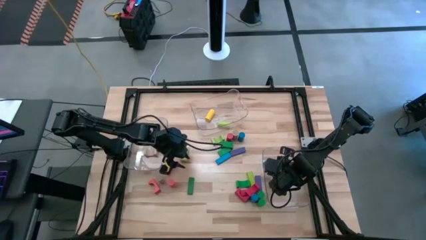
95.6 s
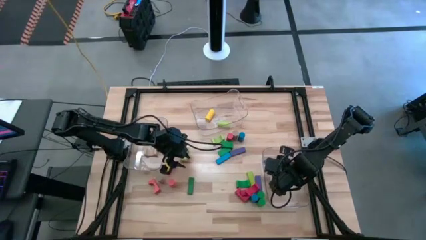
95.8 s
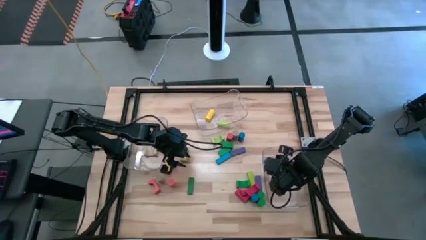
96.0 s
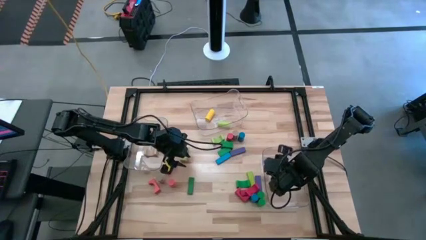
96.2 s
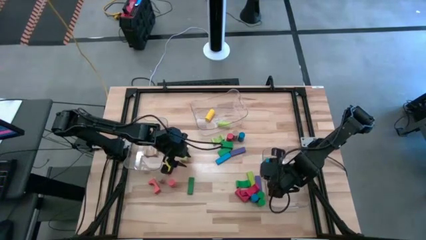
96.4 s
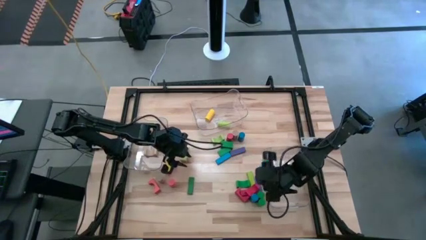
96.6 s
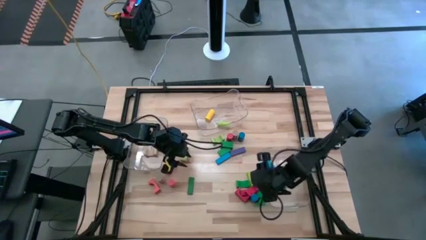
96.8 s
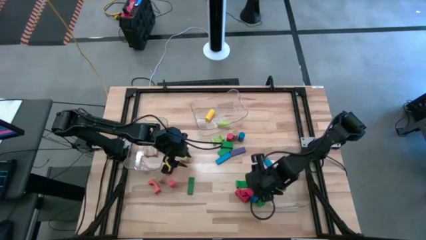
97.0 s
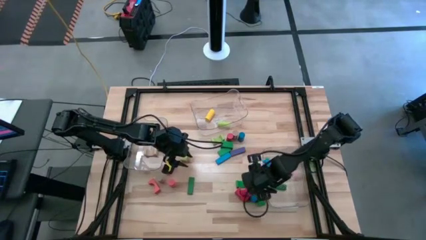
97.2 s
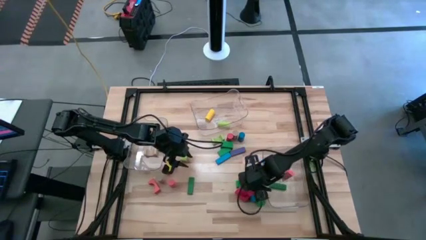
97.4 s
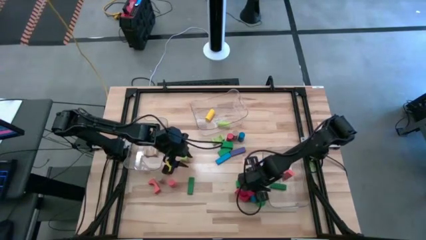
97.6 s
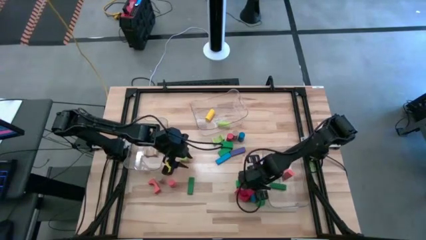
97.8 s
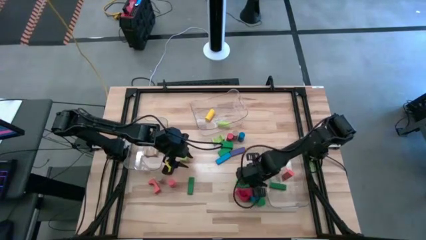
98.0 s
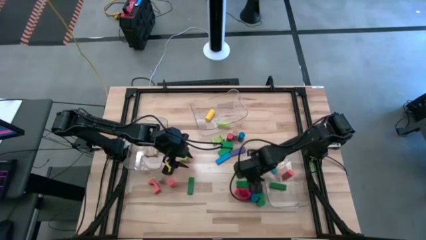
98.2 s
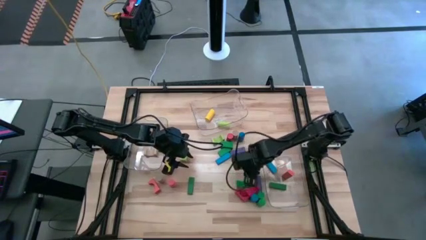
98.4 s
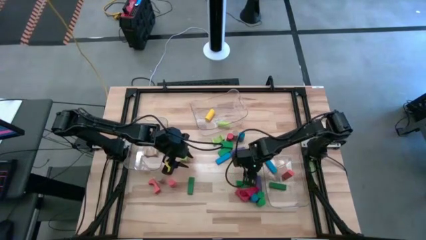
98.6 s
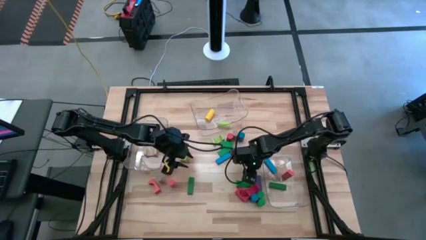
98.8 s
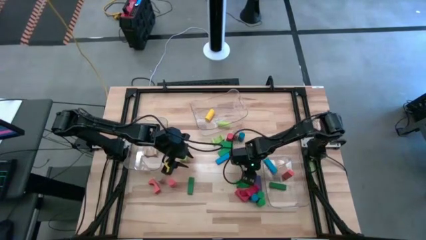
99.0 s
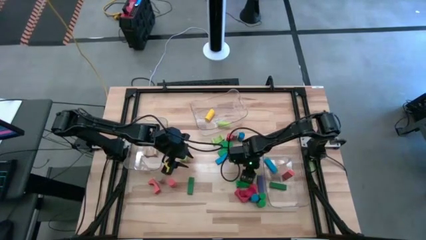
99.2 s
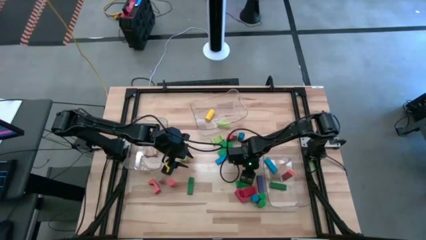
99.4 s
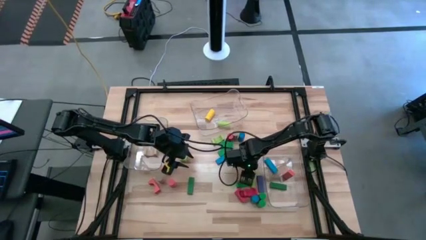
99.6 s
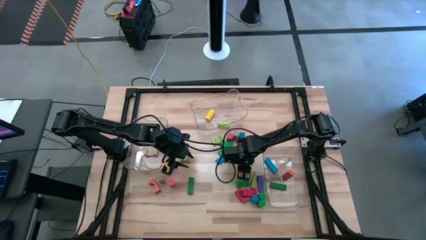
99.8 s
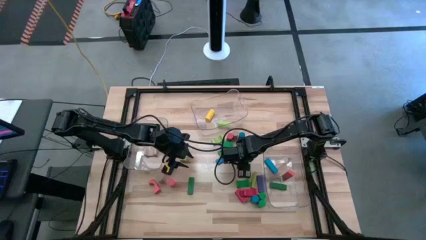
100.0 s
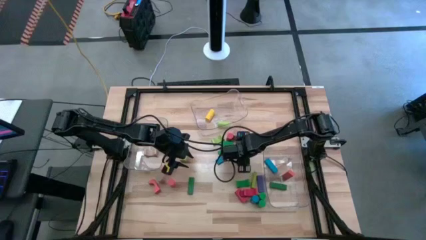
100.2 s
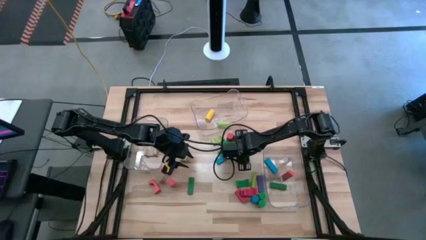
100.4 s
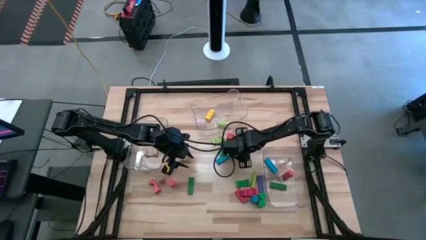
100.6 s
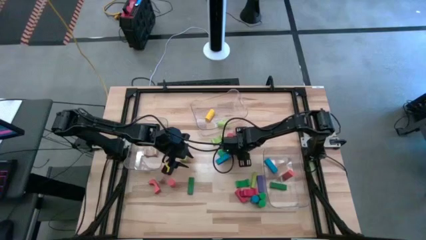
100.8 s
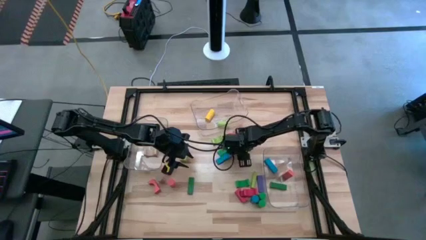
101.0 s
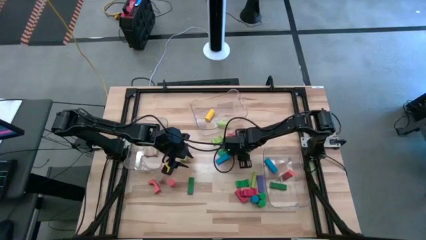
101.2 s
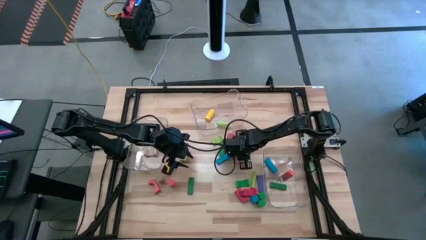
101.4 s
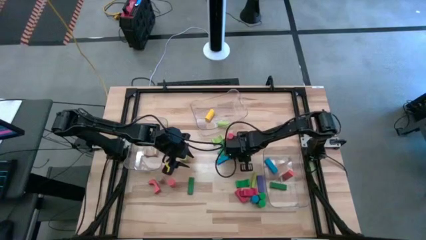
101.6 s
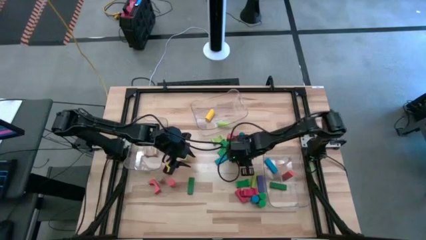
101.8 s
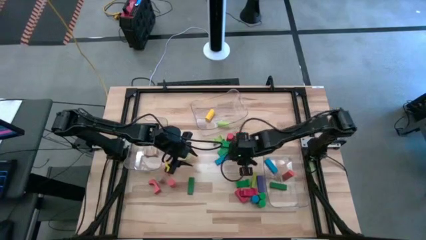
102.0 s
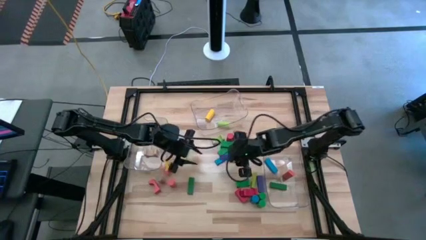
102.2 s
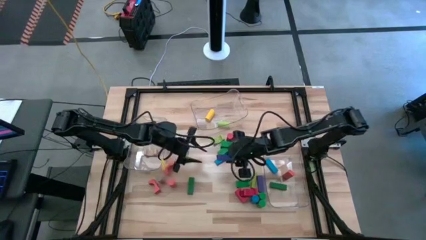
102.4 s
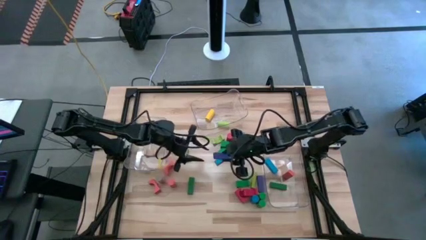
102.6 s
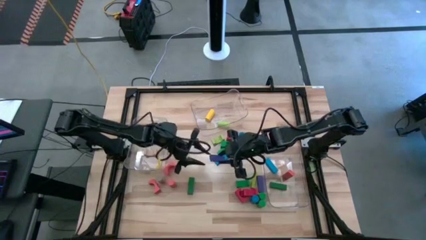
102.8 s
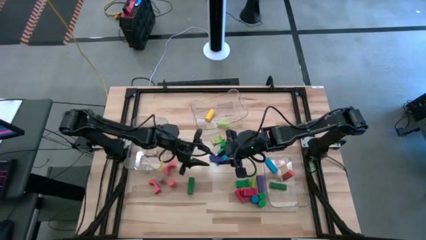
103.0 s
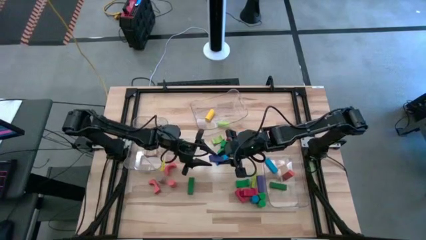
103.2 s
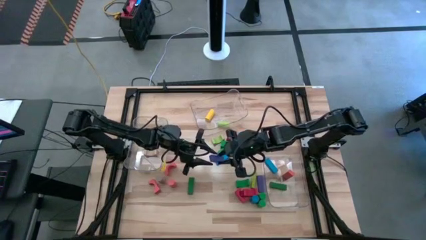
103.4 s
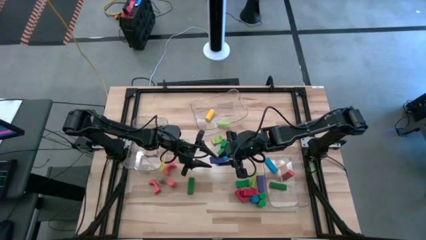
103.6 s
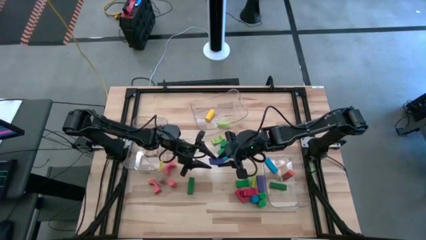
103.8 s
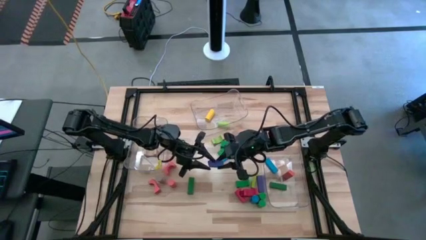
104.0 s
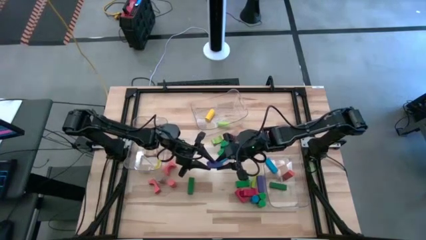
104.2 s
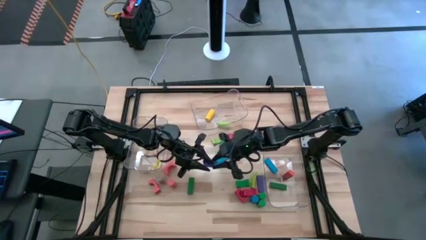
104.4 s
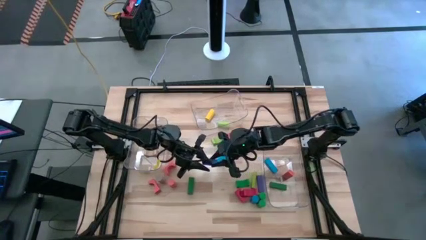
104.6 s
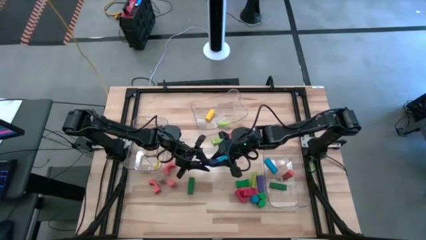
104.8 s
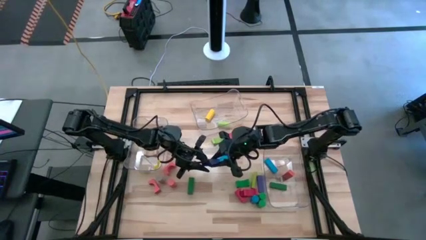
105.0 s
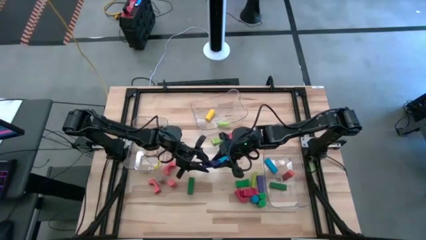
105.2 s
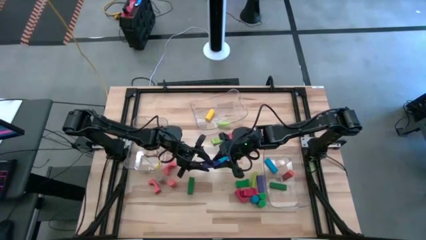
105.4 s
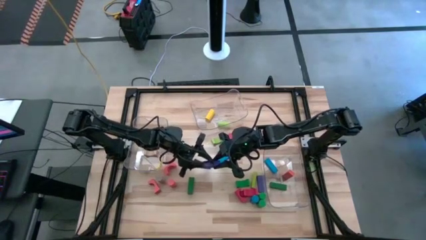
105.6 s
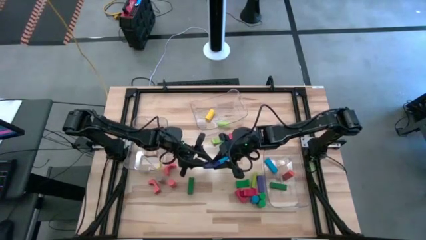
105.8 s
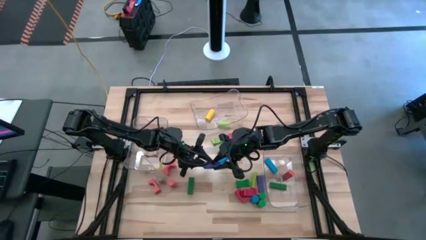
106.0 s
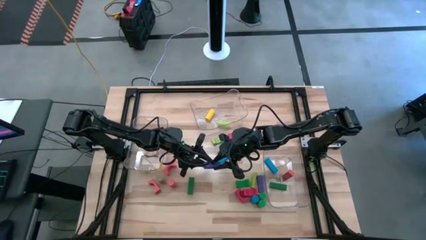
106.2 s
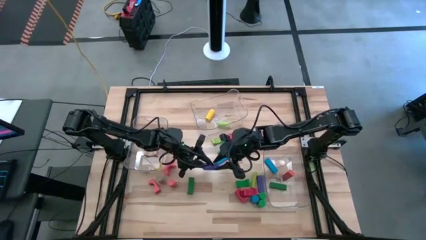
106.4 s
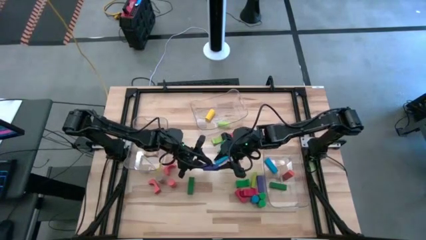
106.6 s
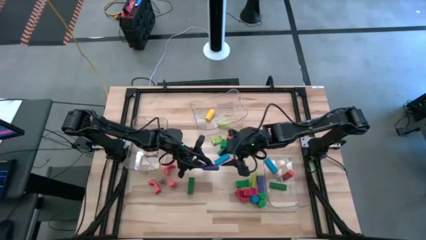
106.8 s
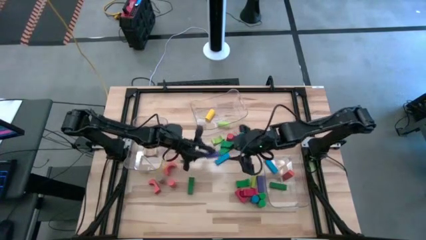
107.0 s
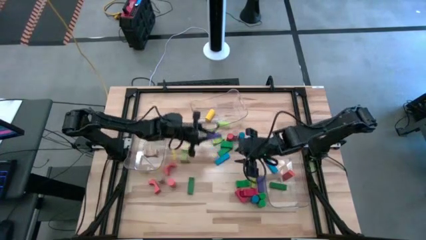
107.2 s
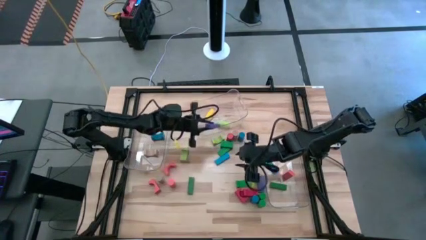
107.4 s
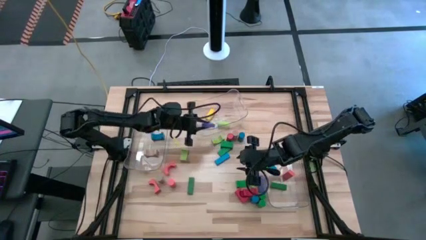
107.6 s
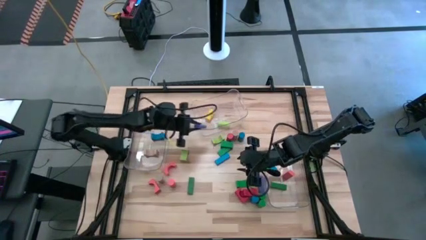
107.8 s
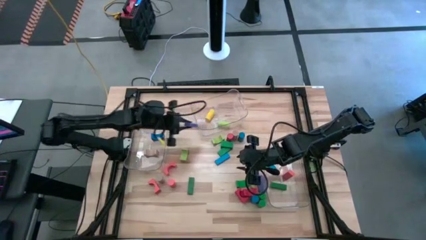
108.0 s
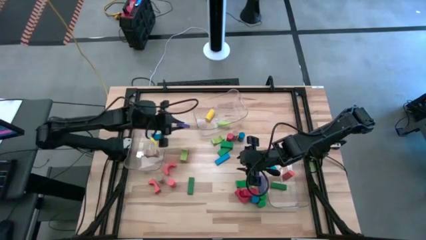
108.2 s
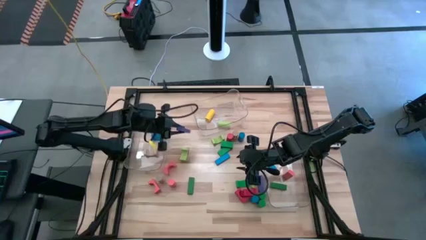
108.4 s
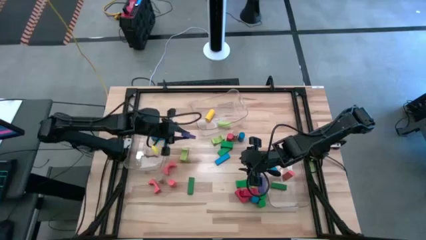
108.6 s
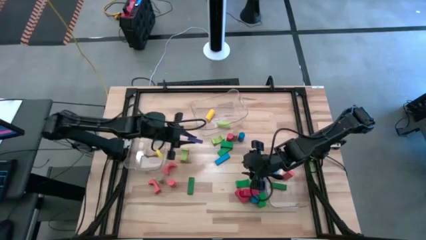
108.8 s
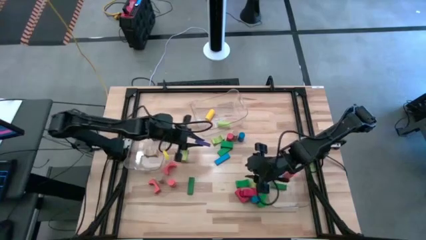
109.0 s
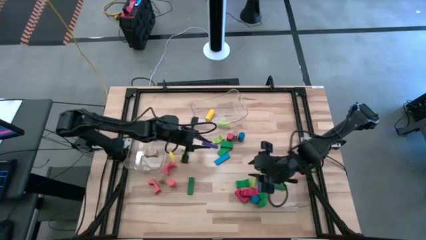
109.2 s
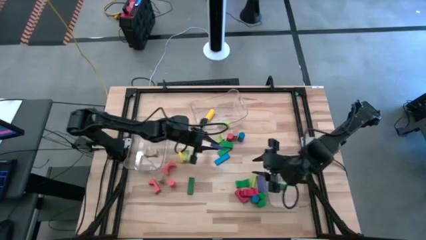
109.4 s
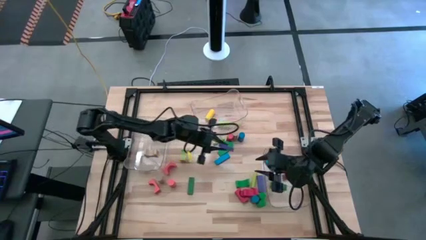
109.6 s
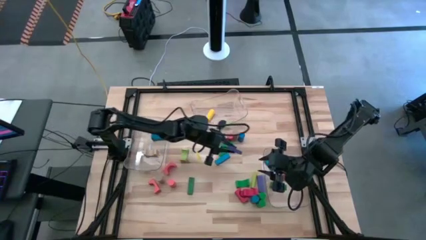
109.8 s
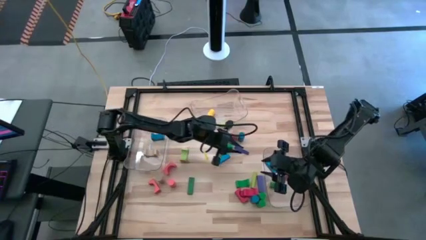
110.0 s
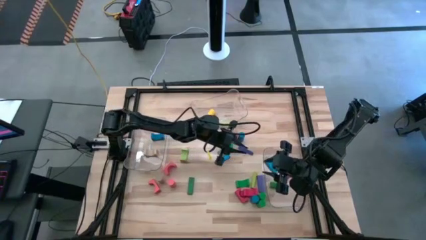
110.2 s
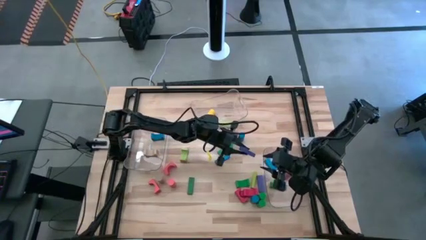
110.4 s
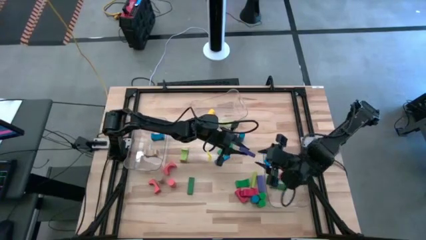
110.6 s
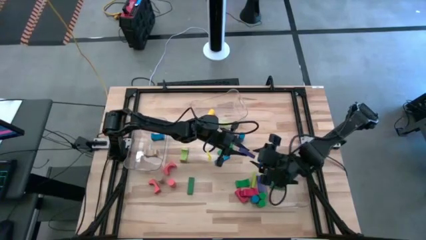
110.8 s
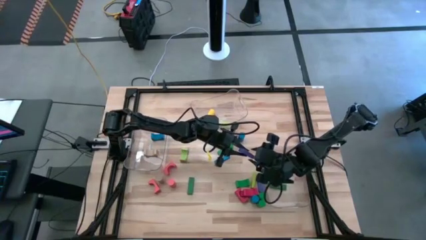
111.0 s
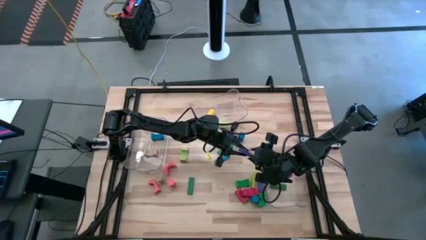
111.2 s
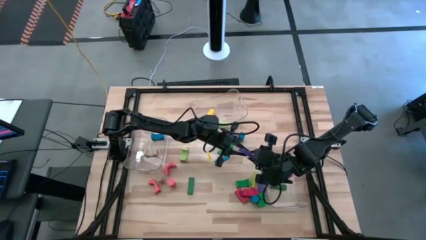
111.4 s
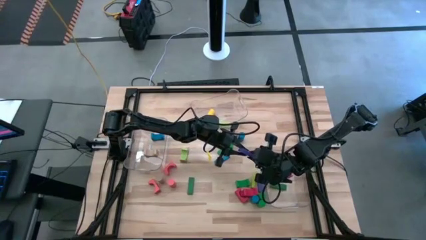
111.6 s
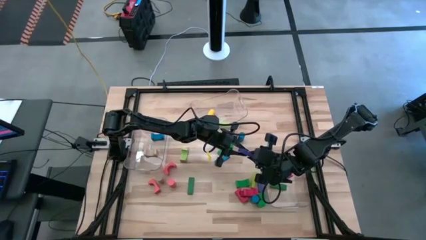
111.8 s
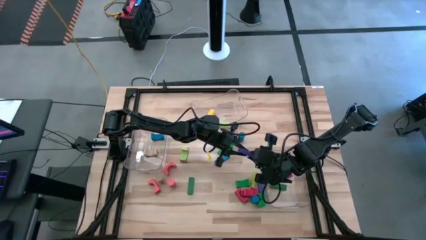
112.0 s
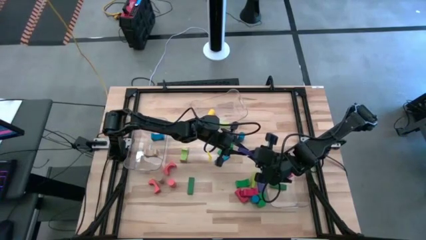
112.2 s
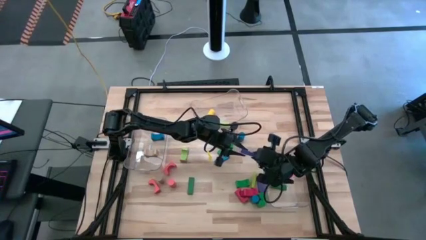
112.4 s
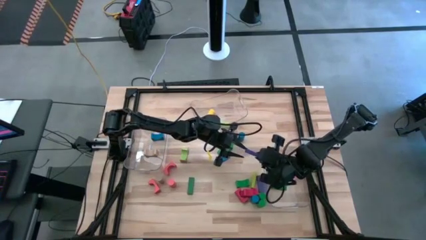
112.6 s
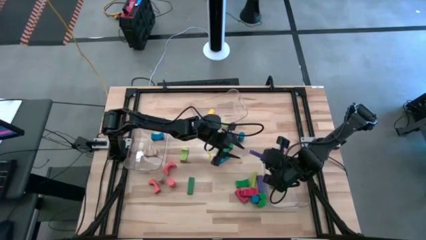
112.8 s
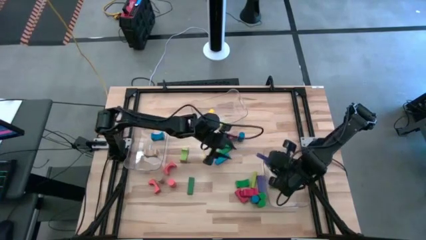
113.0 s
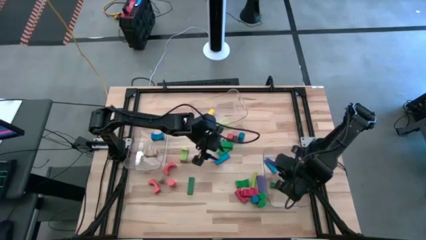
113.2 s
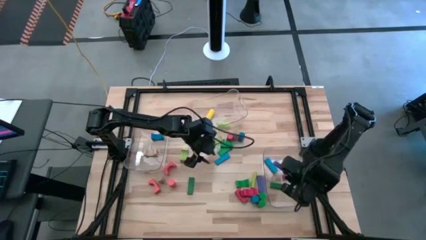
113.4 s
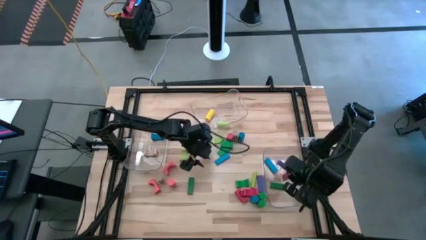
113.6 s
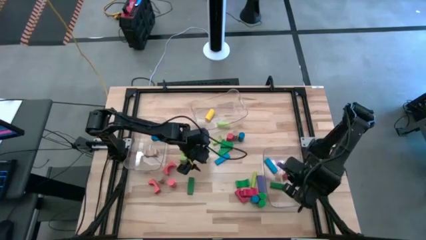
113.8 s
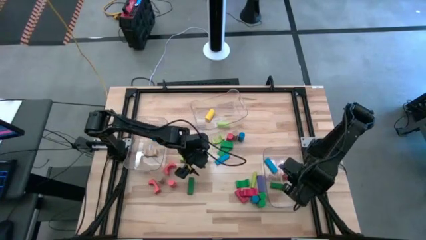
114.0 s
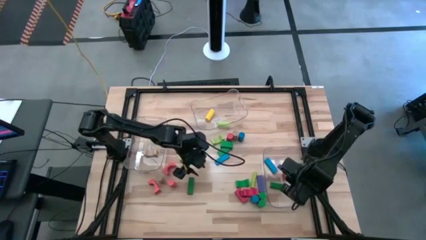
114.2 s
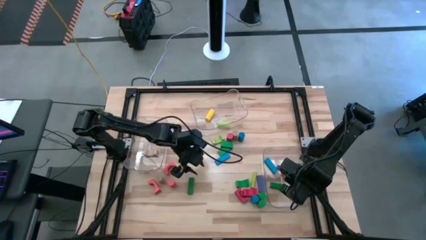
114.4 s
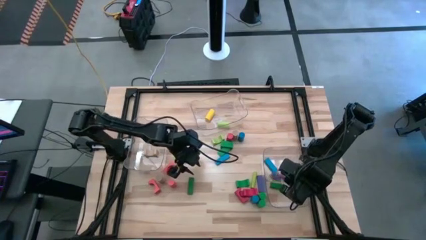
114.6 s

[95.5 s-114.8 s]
Task: Sort blocks by size
Put the blue rectangular block into the right transparent bin
